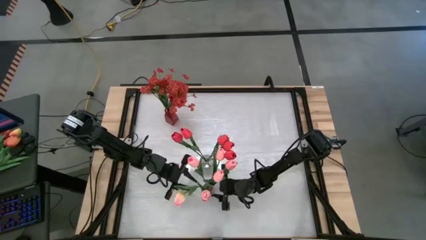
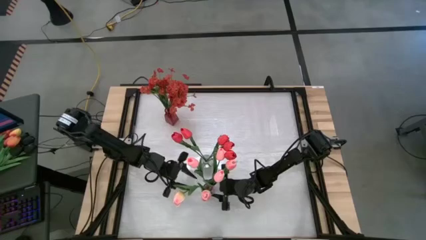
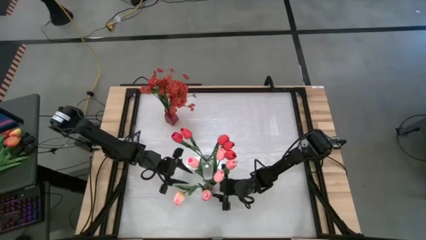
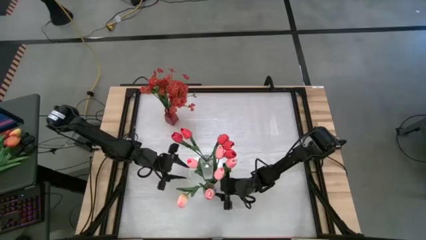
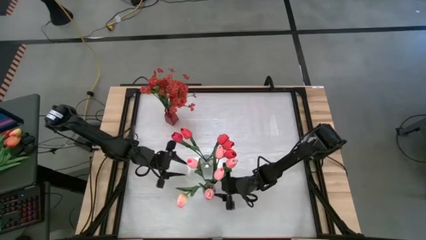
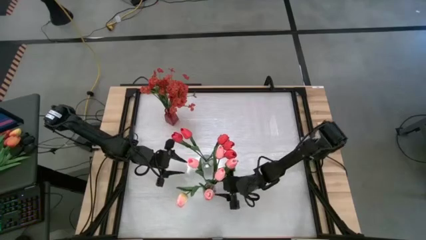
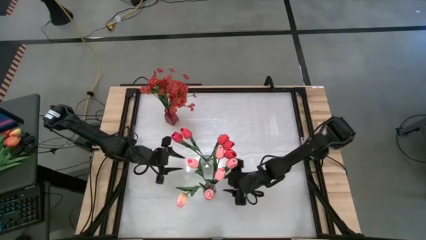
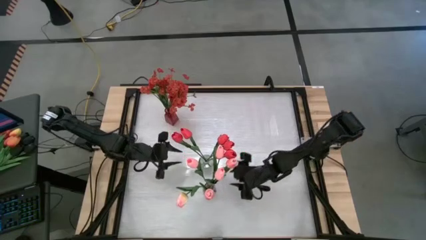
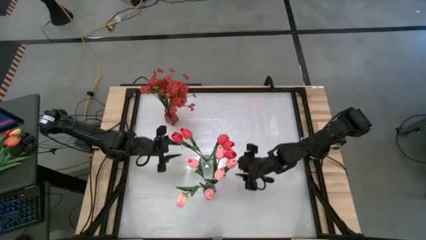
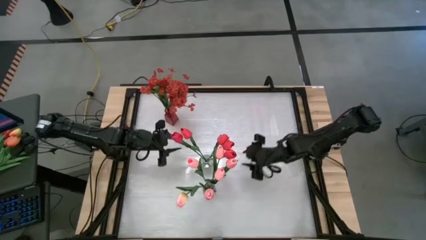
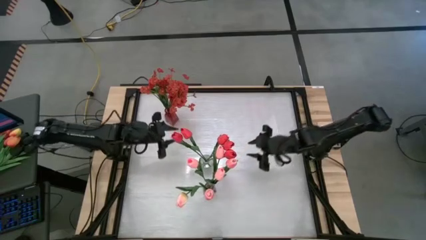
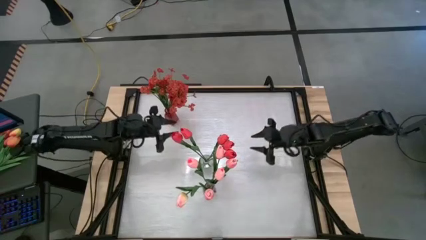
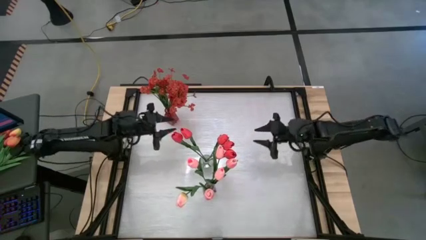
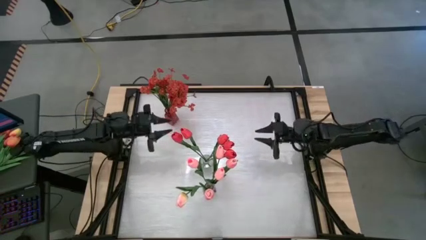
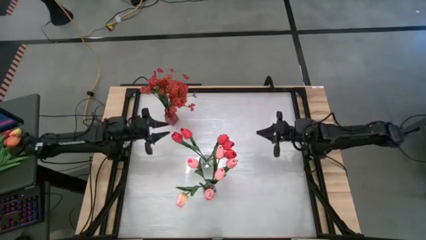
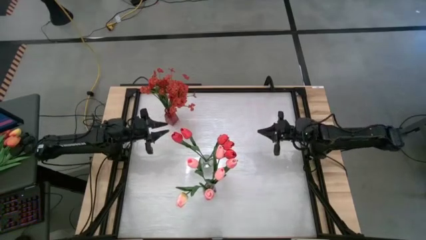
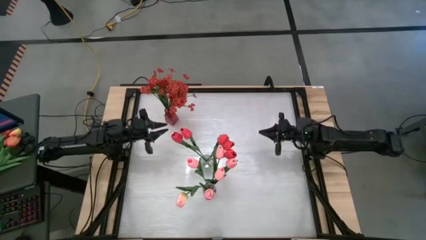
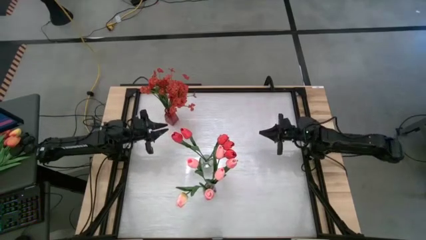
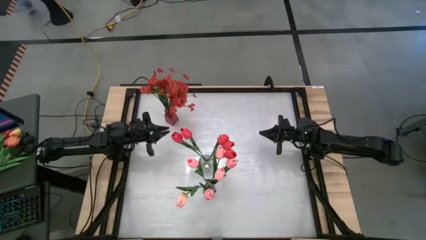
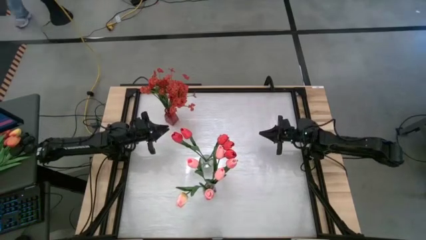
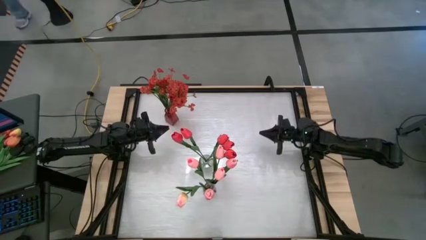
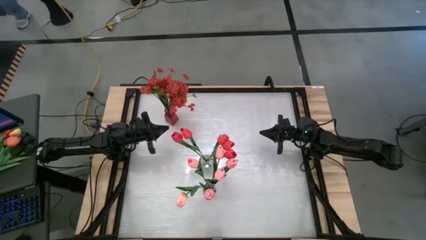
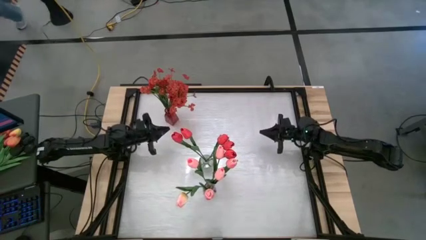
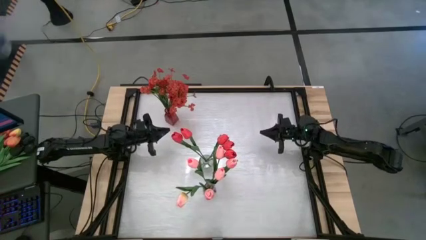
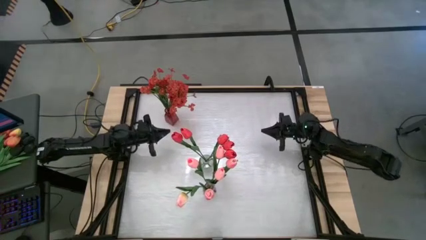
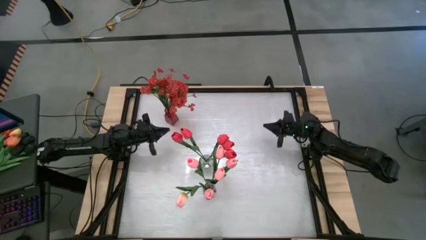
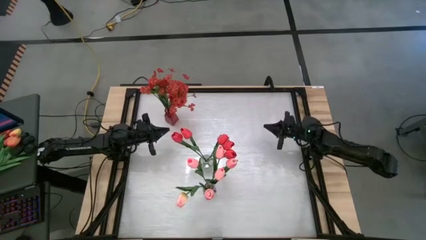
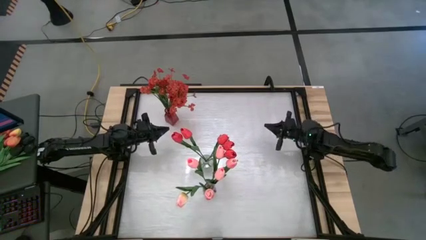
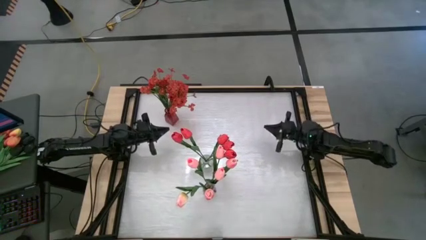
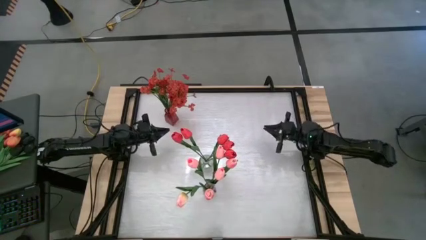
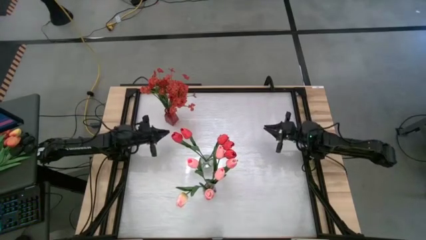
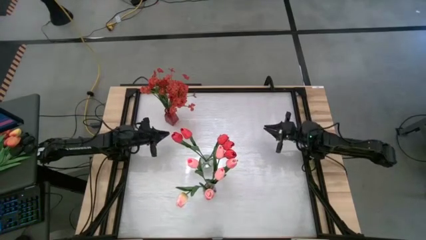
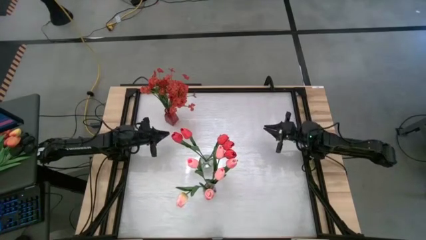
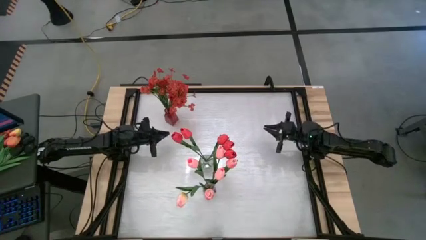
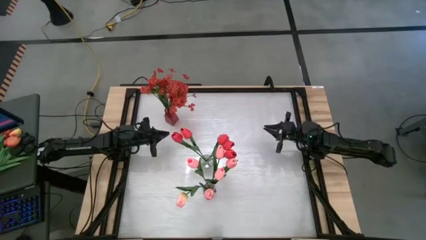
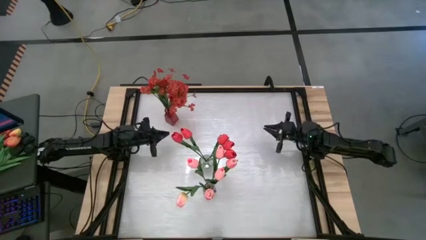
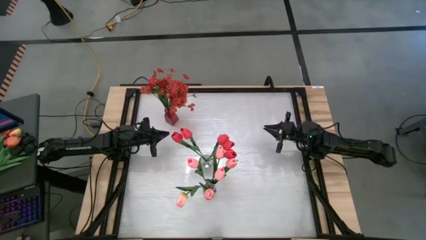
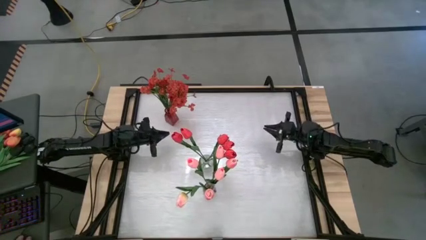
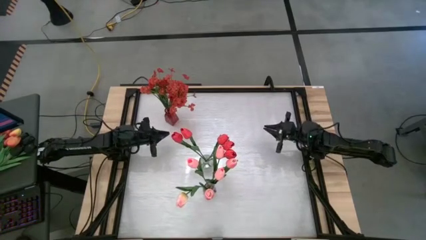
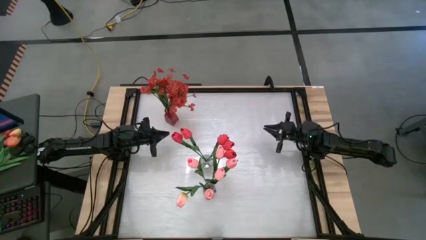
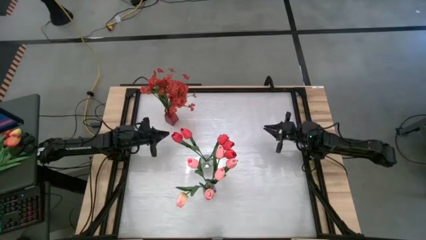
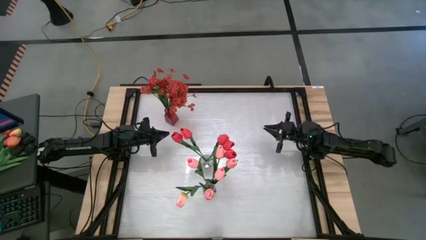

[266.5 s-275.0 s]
Task: Sort flowers into vase by color
Return to Home Position

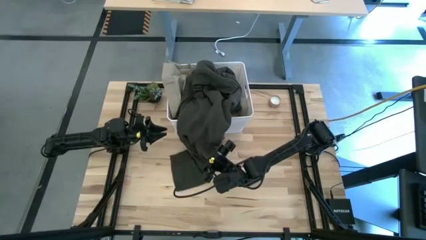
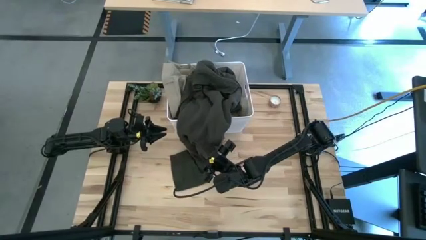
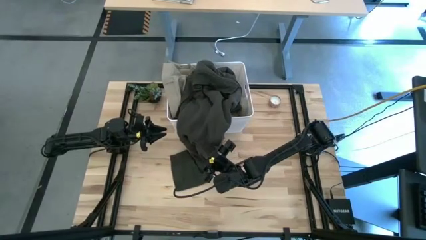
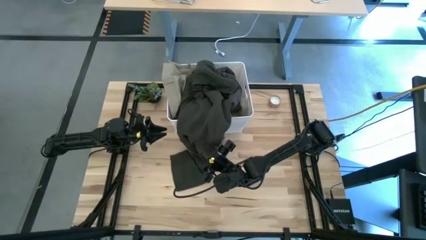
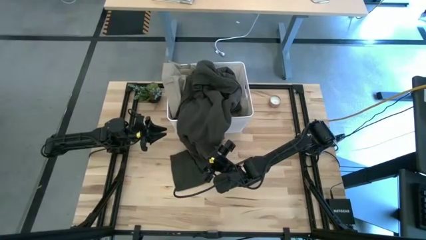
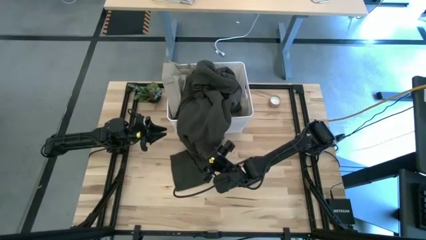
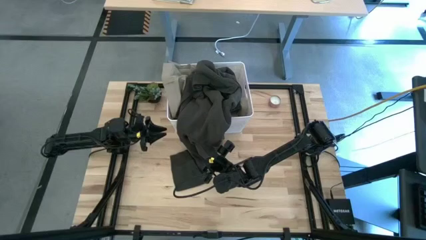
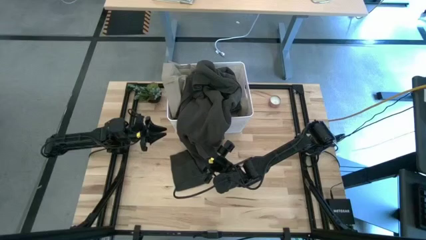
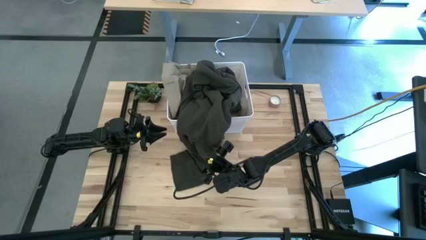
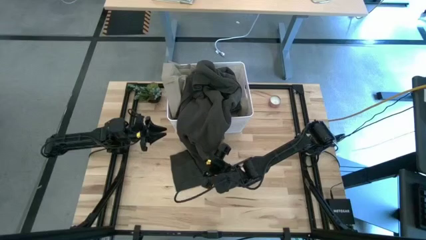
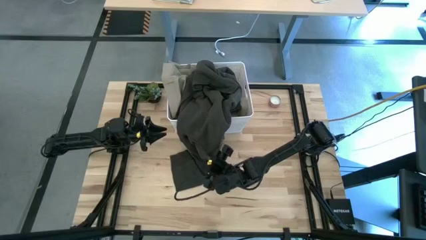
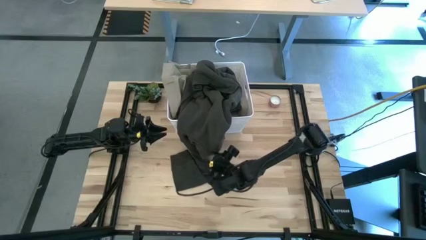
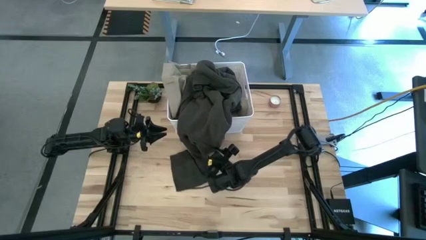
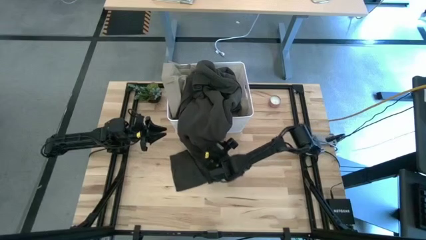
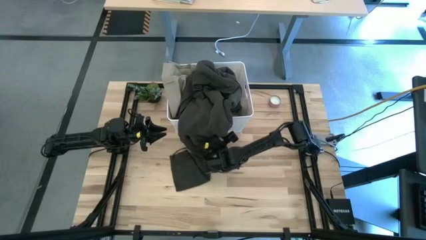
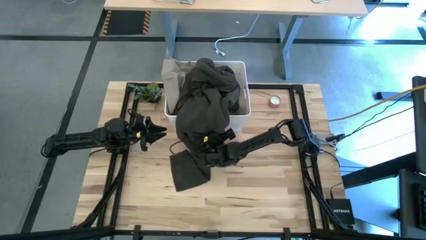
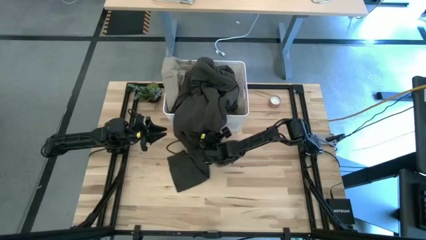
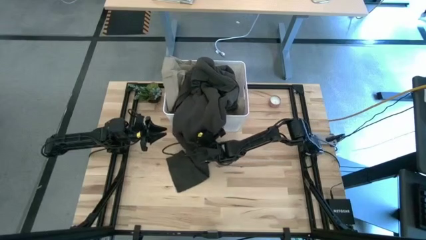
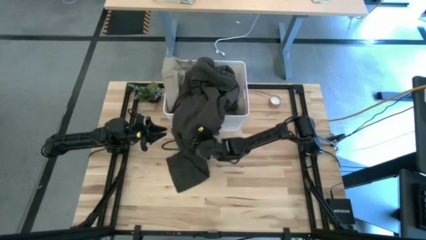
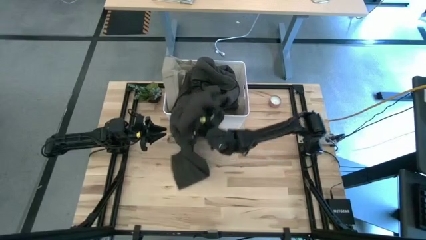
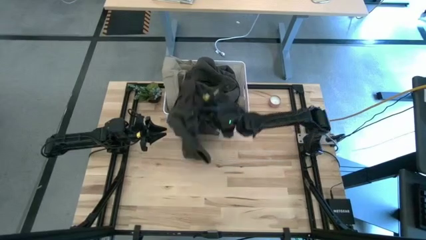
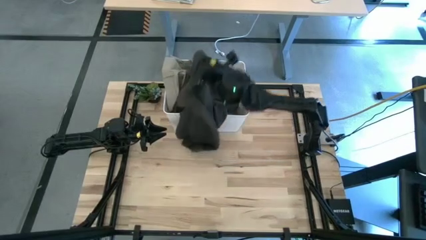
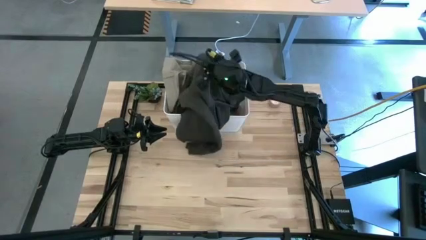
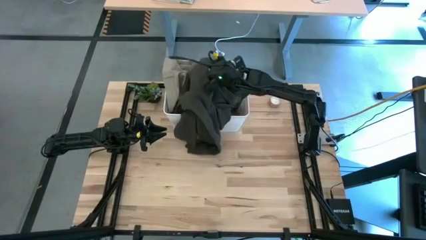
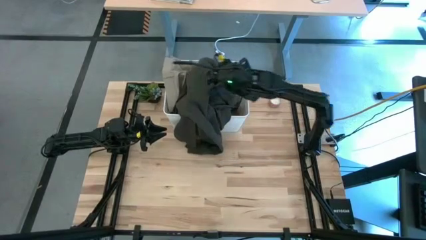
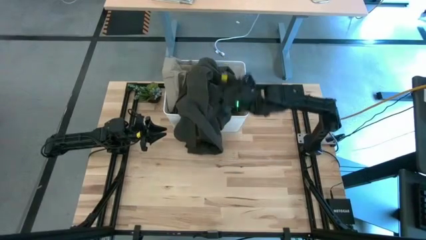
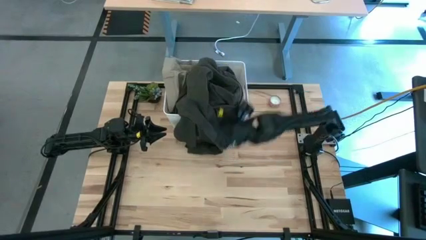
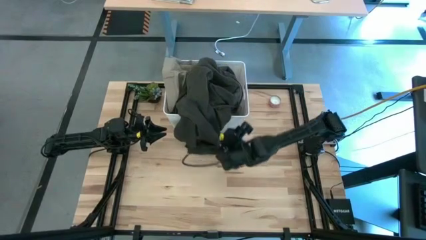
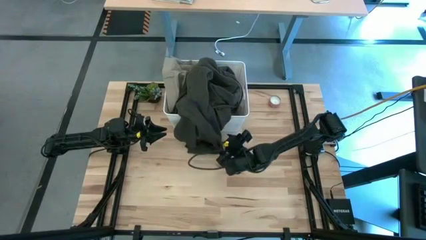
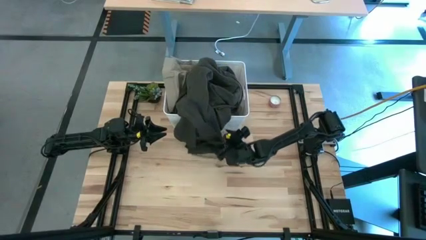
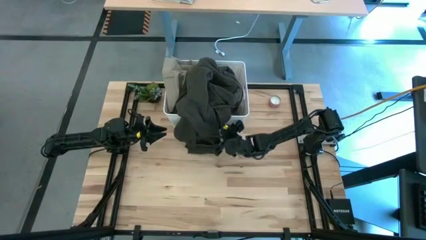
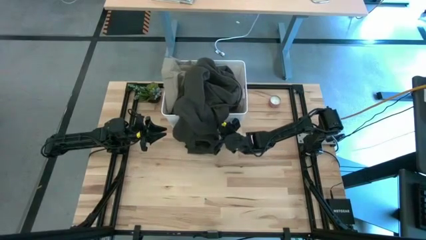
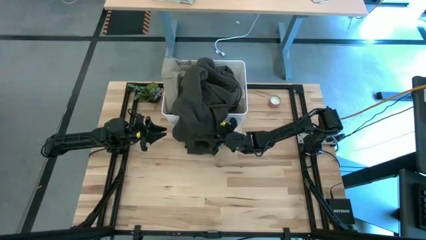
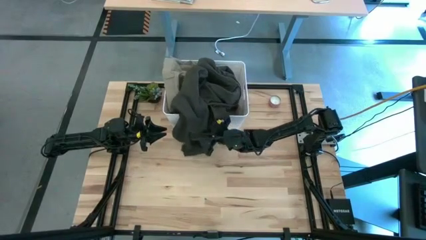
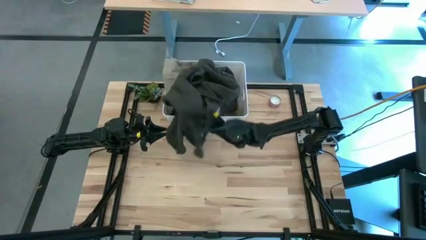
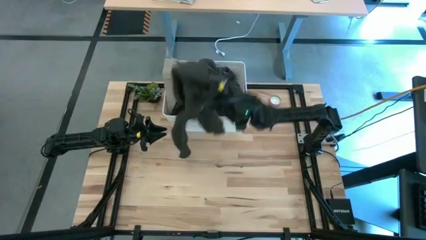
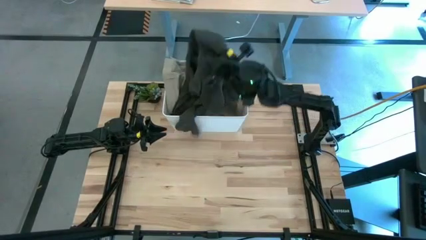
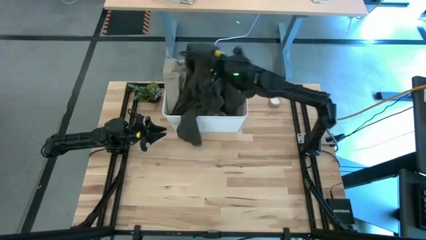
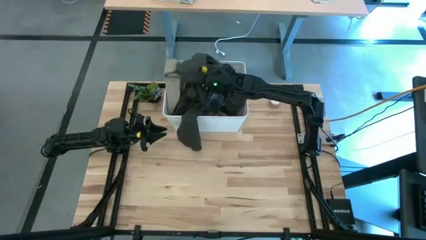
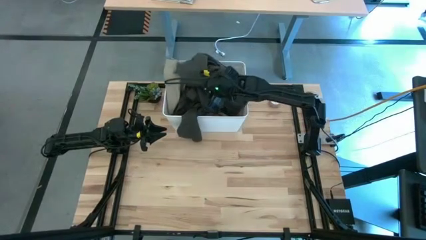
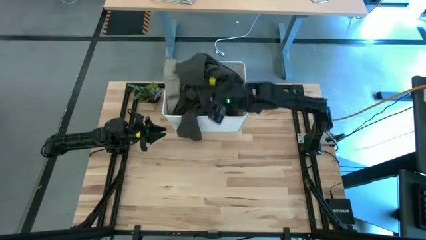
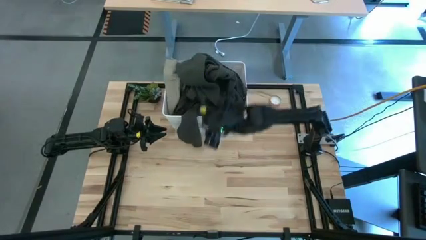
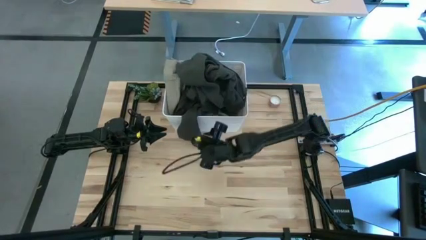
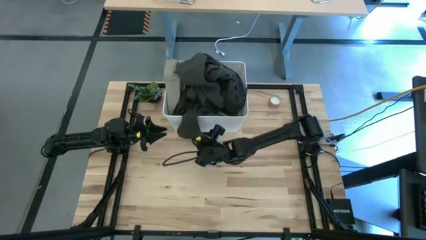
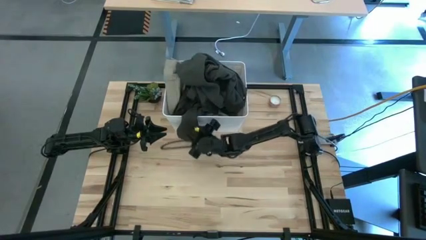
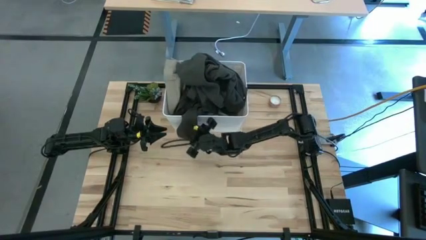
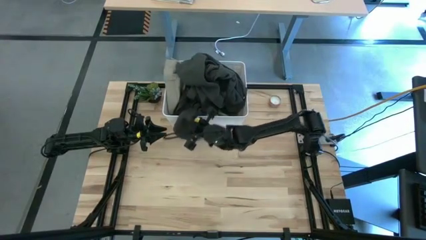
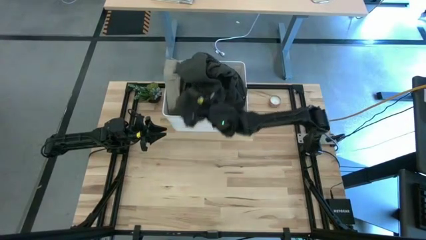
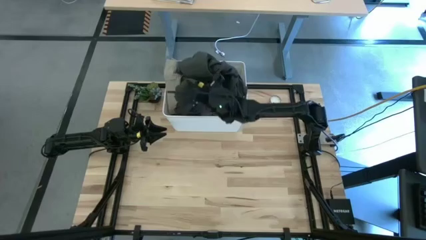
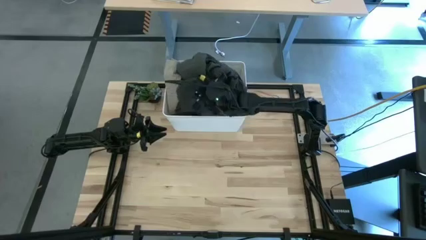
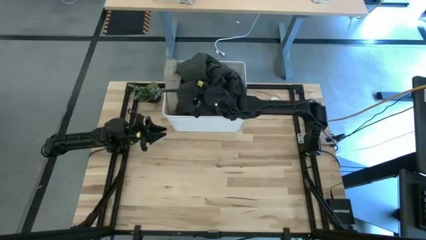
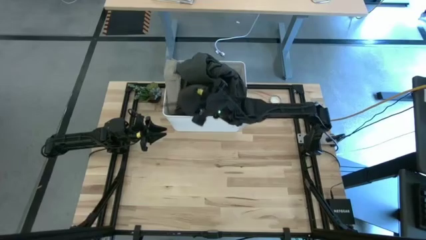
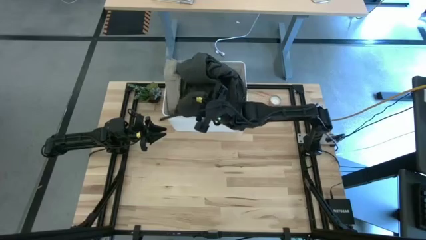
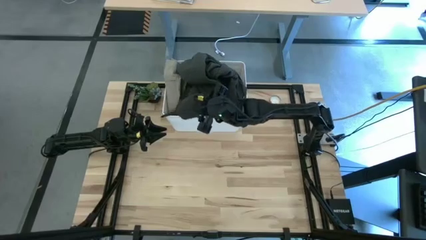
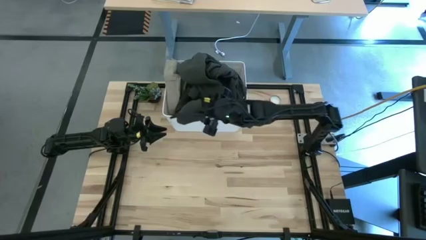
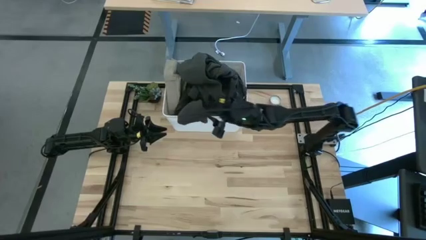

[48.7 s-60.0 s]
Task: Sort clothes
Put the green shirt into the white bin
